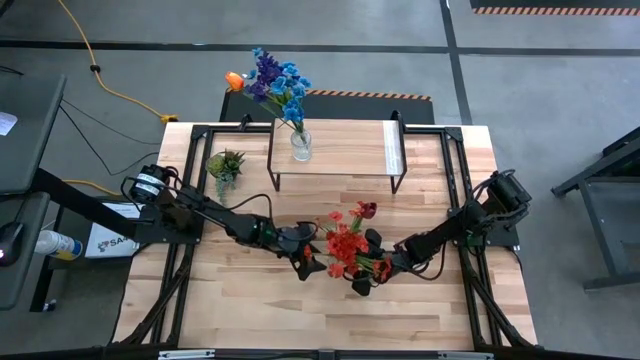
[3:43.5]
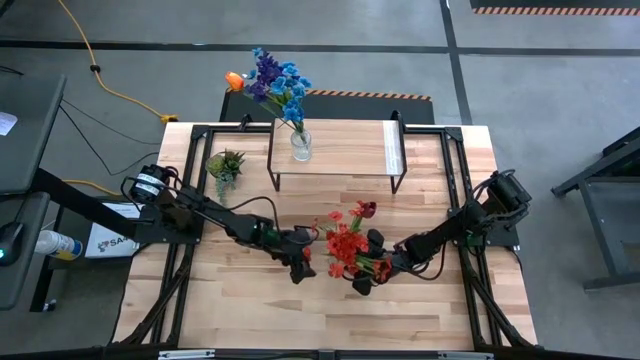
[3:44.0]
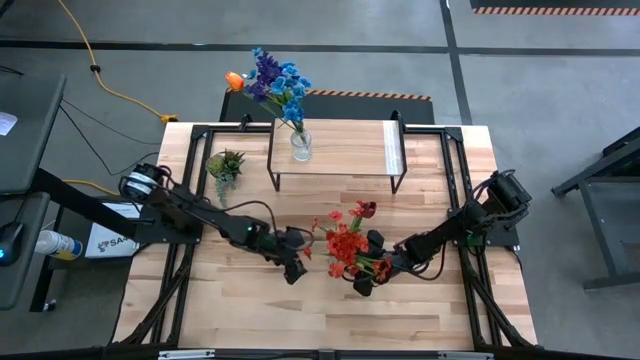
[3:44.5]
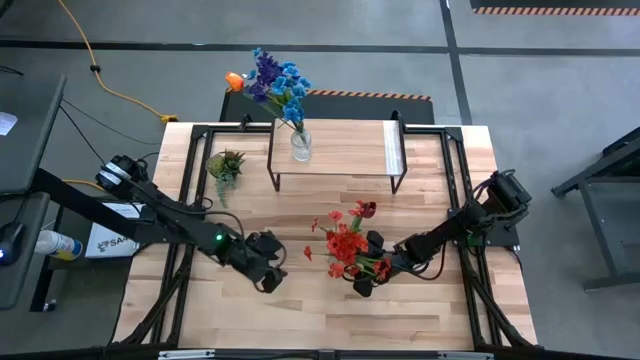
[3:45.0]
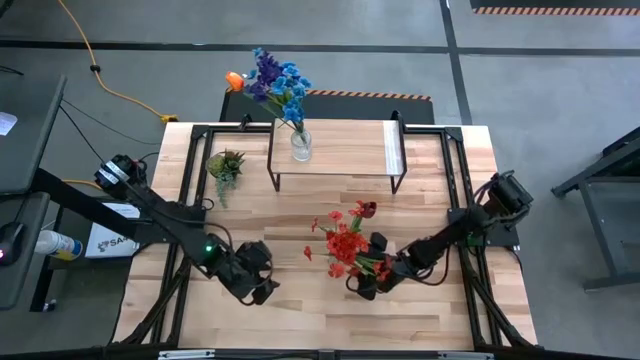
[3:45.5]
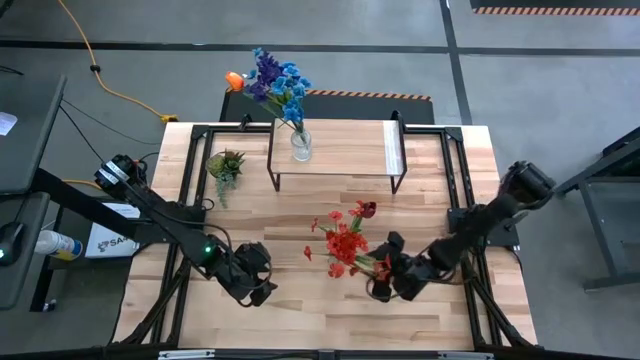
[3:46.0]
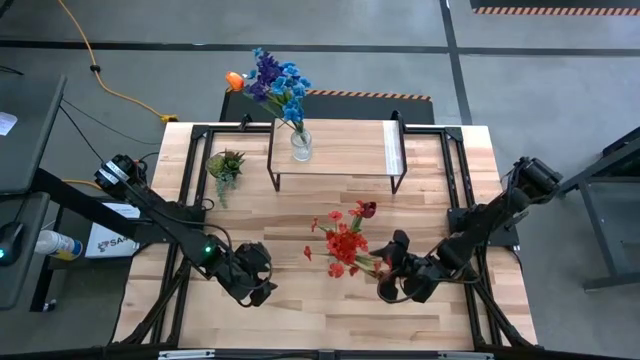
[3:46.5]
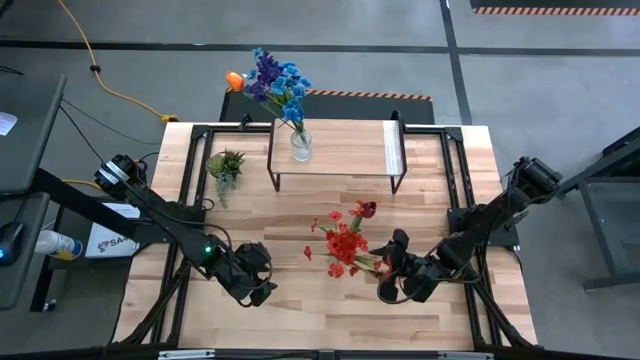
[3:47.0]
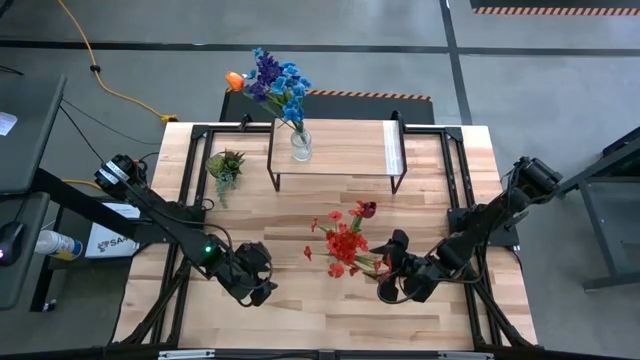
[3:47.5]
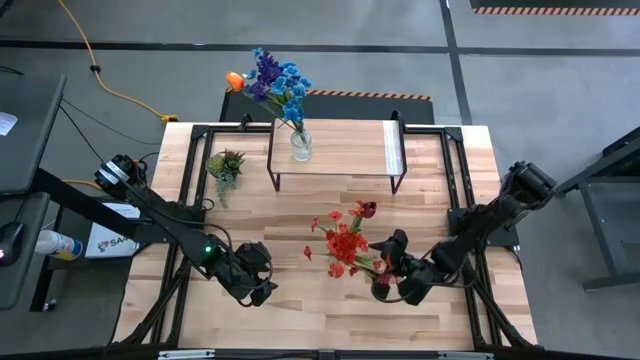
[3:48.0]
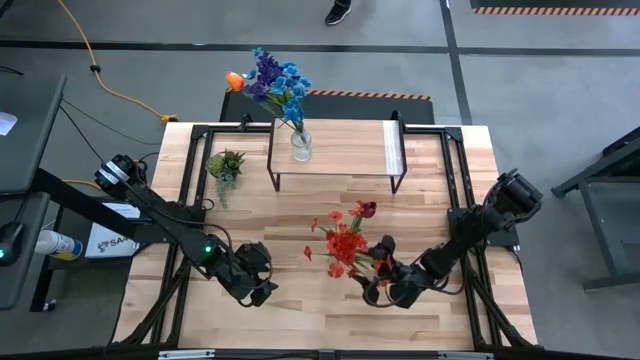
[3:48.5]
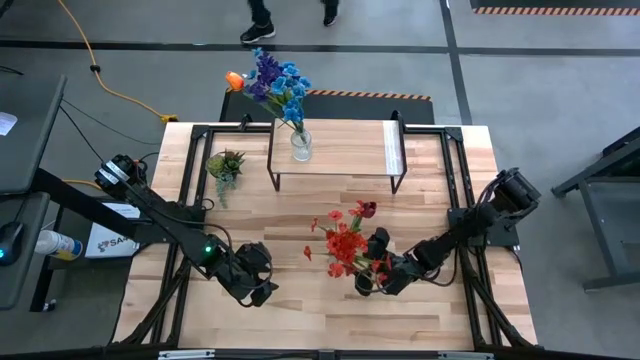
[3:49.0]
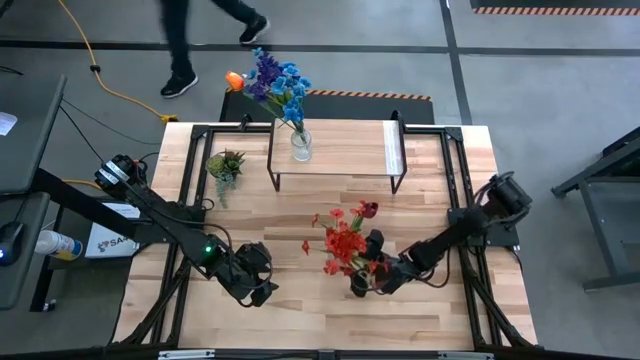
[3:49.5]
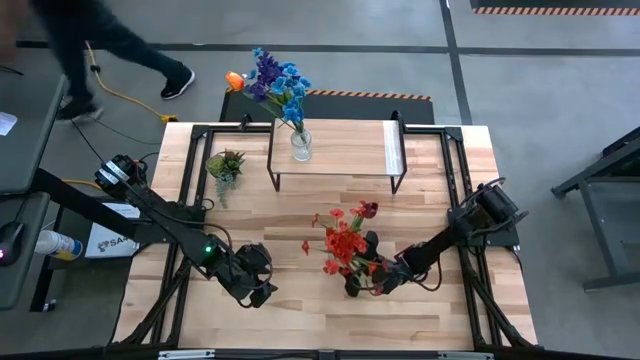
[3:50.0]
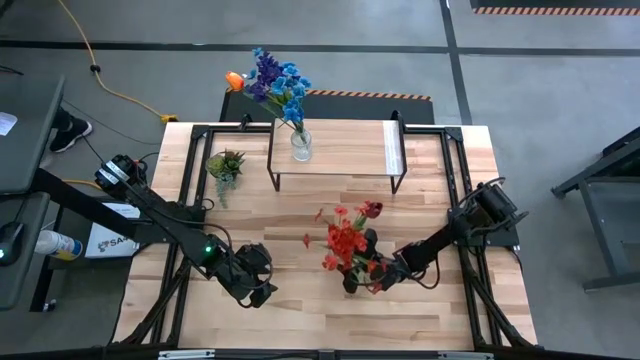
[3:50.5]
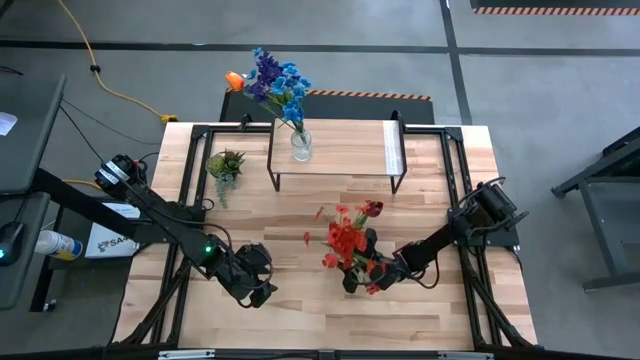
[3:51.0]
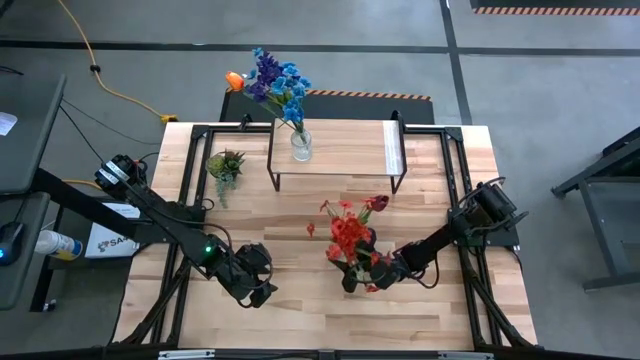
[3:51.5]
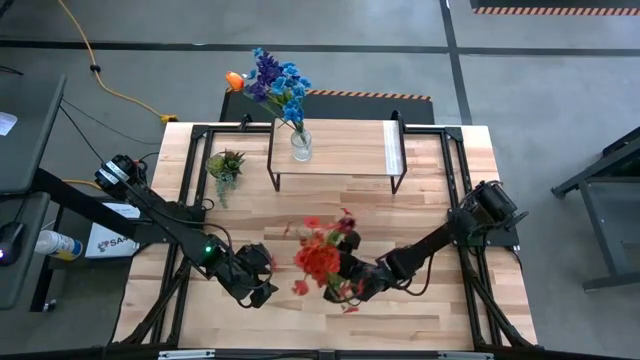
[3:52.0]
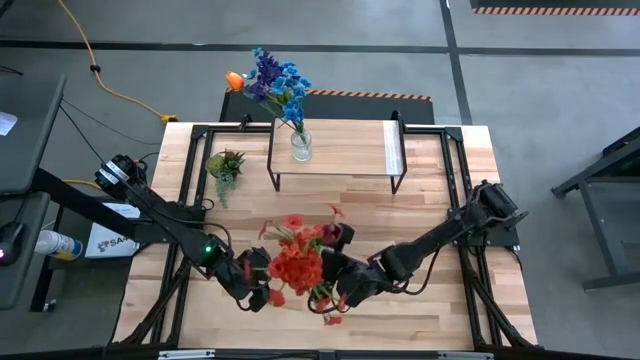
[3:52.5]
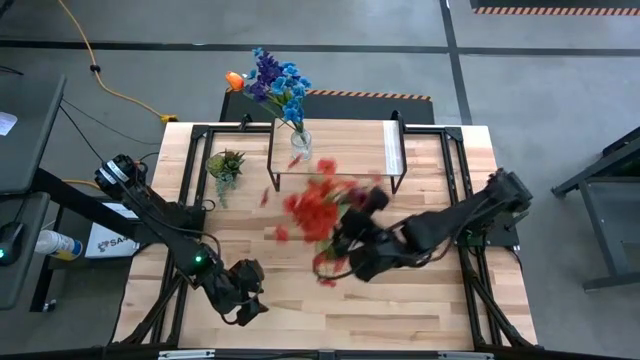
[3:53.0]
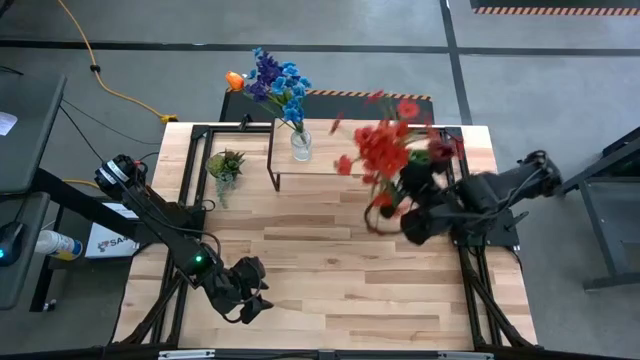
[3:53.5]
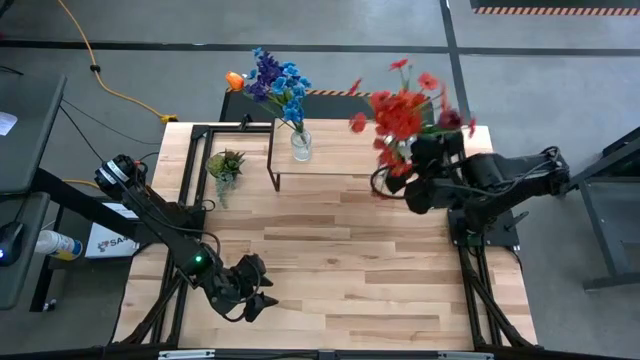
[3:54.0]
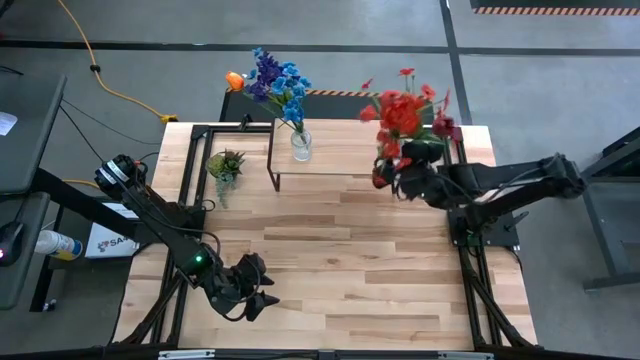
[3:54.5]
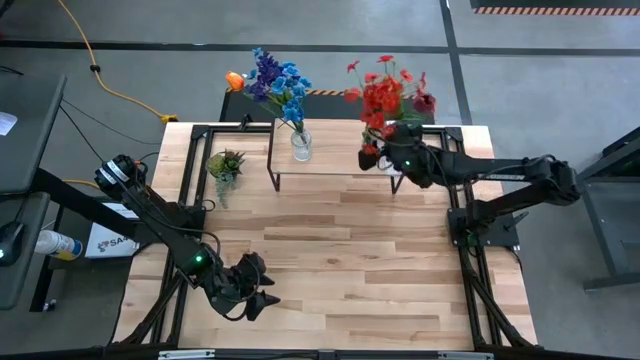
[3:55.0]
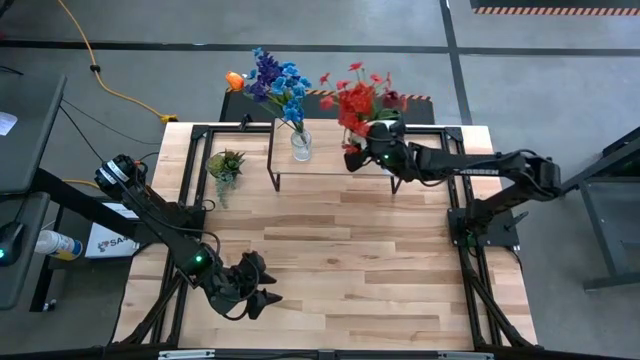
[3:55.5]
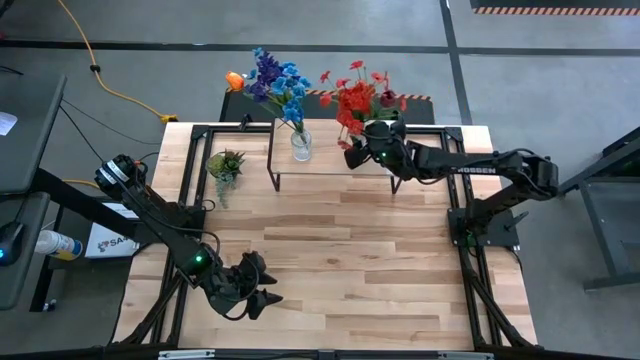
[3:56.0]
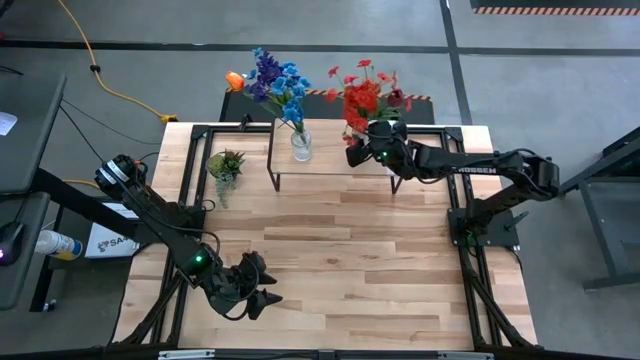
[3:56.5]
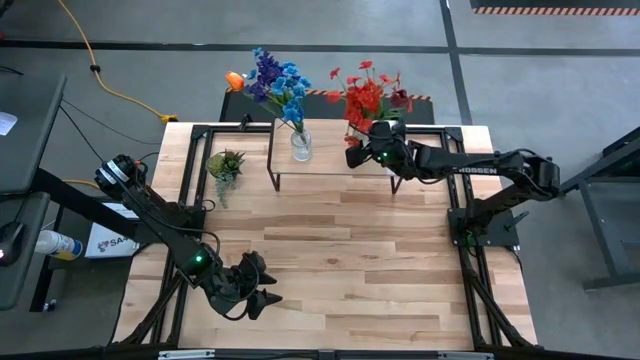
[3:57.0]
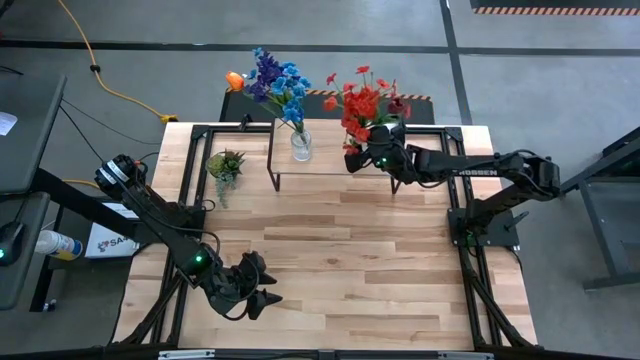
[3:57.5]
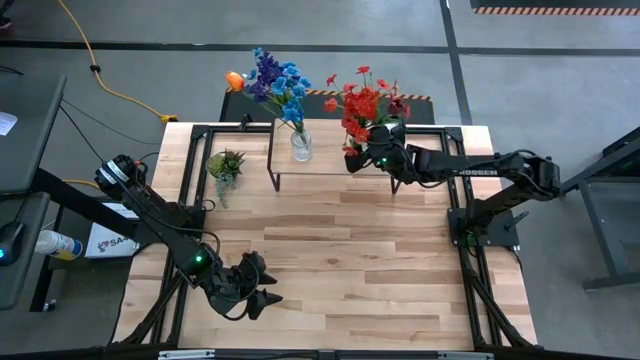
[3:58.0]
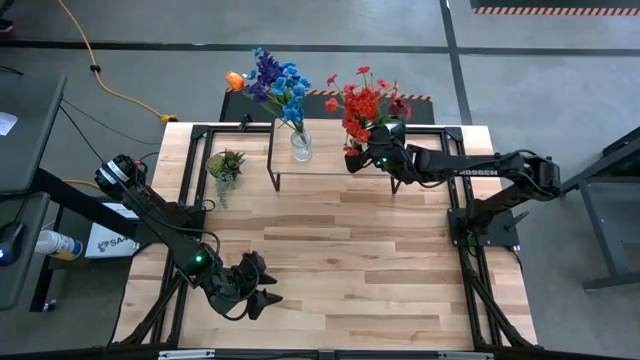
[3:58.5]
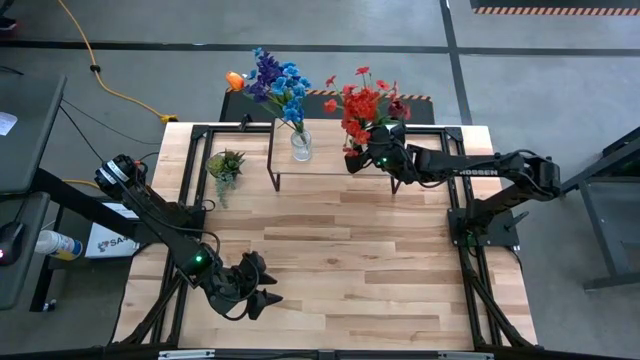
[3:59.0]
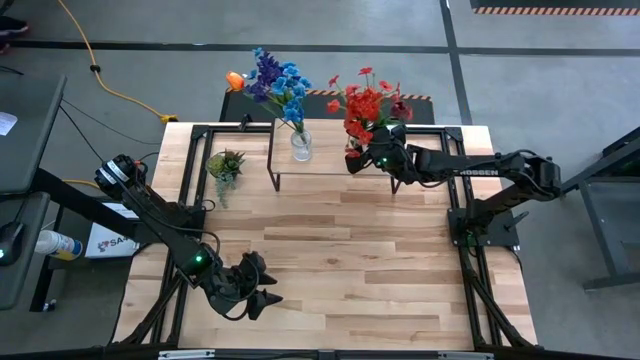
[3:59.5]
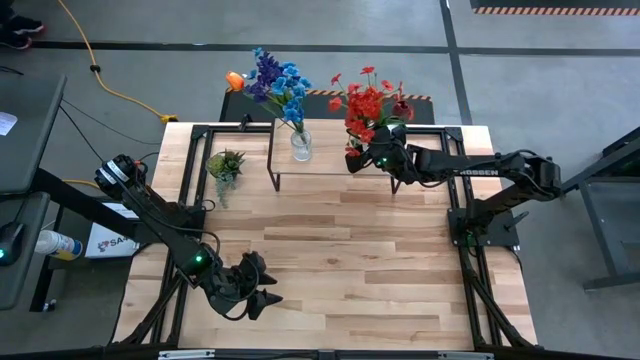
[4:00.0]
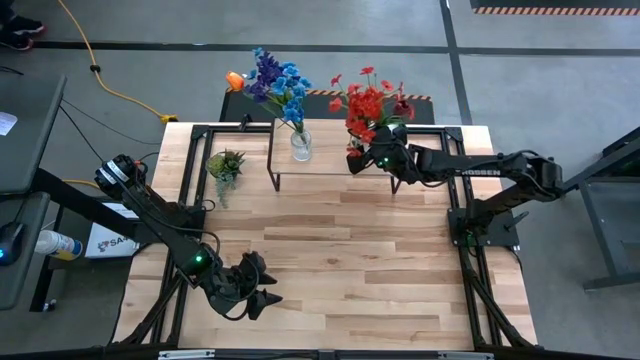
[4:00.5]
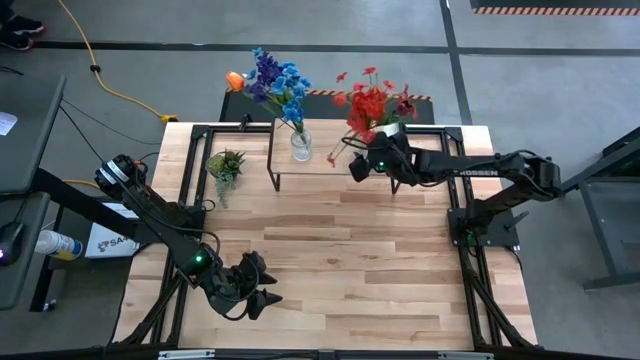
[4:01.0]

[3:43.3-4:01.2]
Task: Pick and place flowers into a vace then onto a shelf
Put the transparent vase with flowers on the shelf
